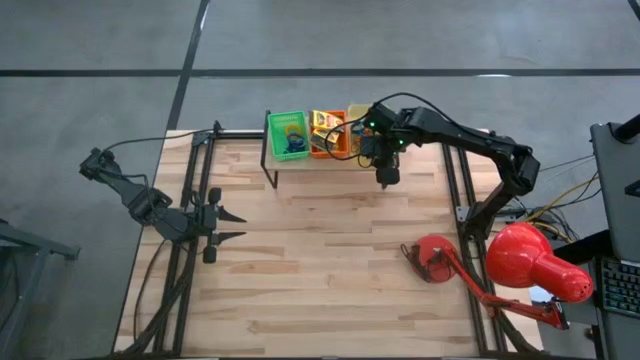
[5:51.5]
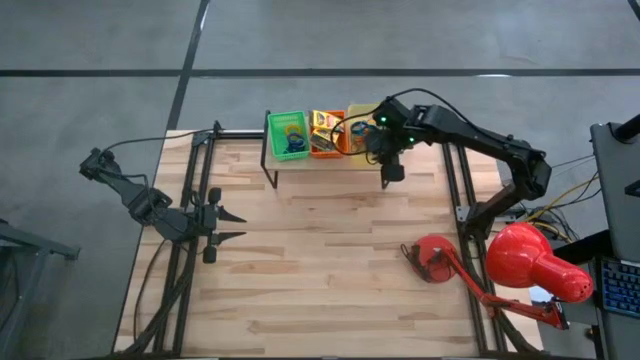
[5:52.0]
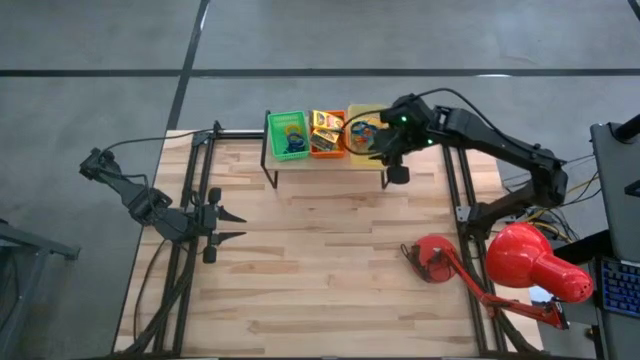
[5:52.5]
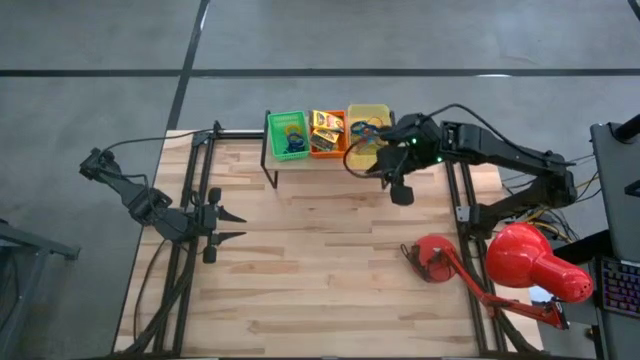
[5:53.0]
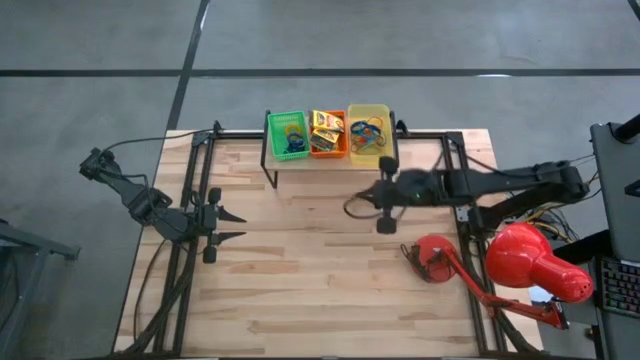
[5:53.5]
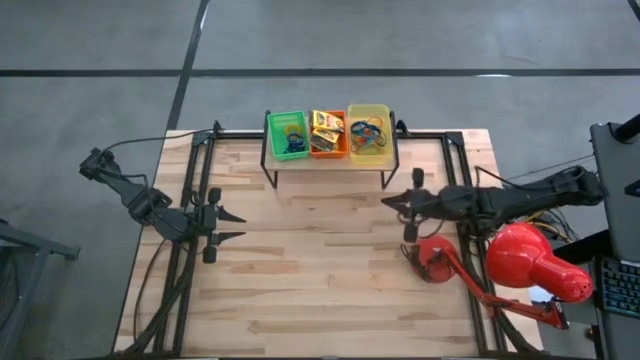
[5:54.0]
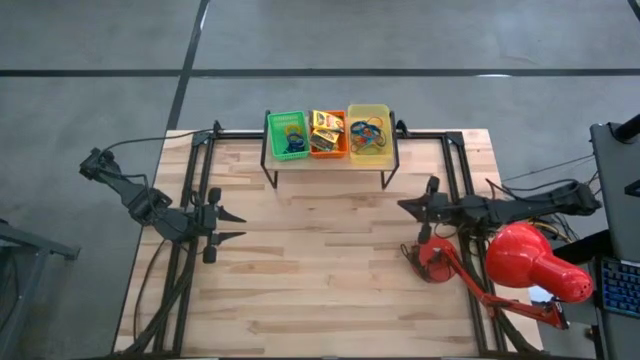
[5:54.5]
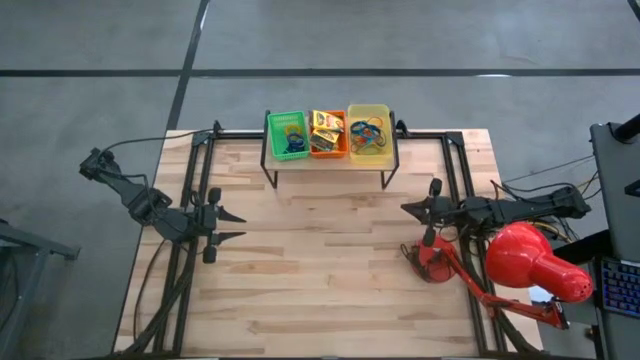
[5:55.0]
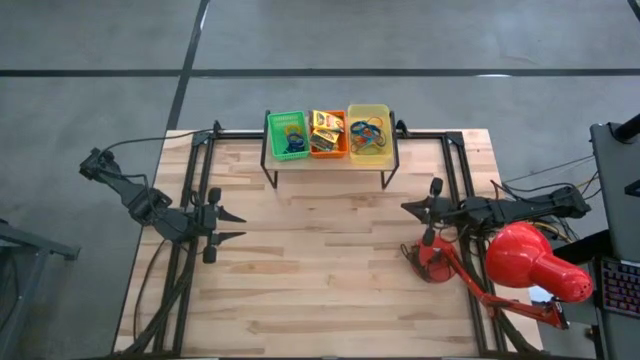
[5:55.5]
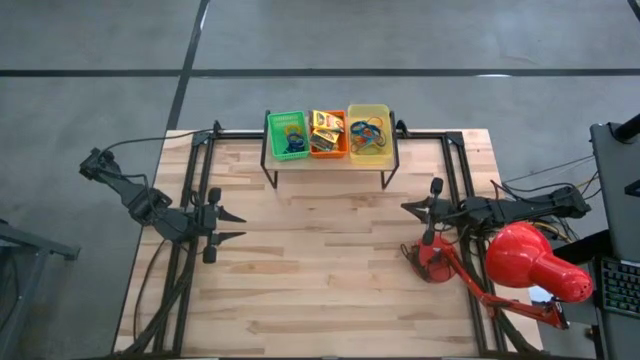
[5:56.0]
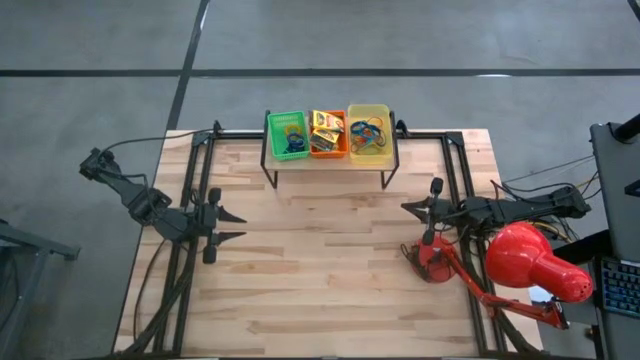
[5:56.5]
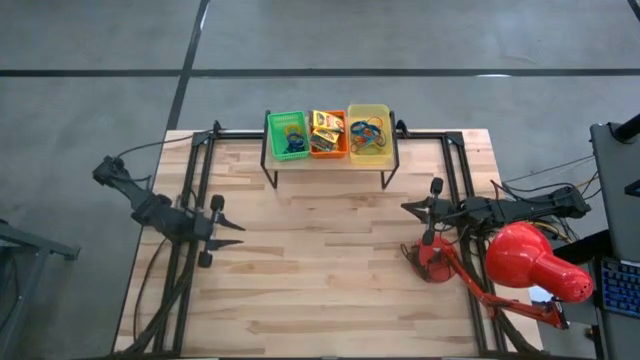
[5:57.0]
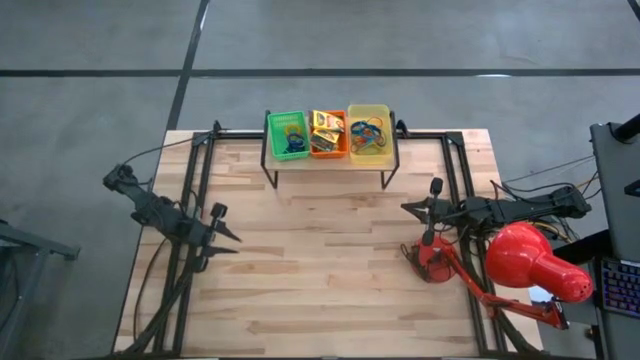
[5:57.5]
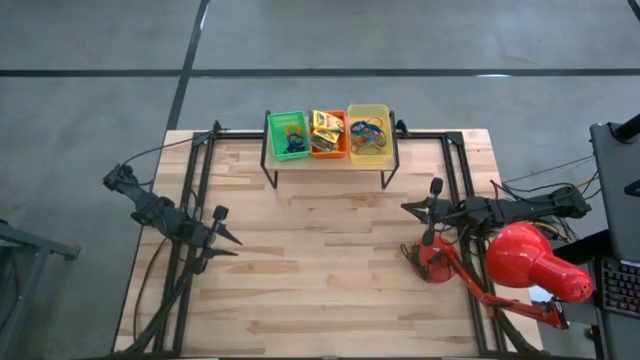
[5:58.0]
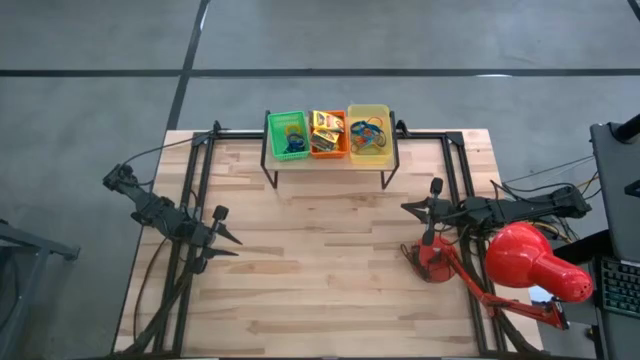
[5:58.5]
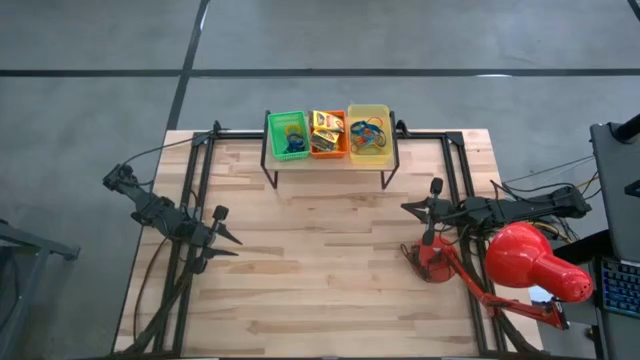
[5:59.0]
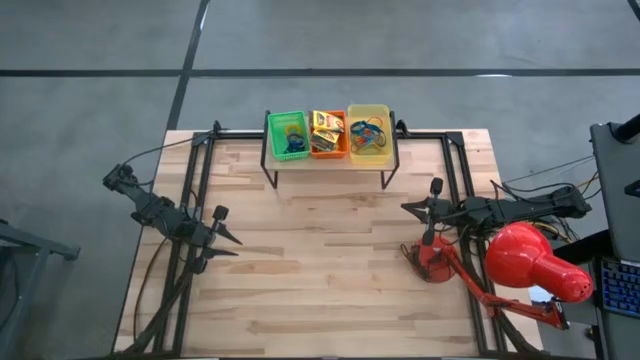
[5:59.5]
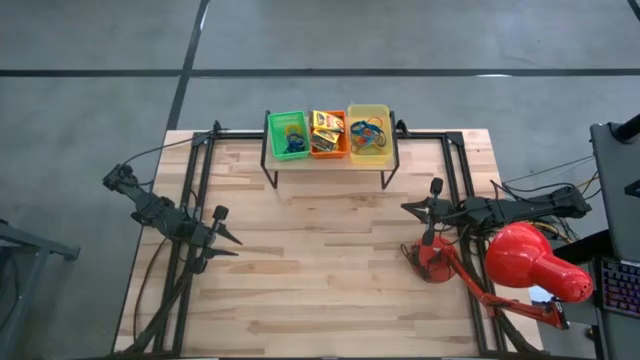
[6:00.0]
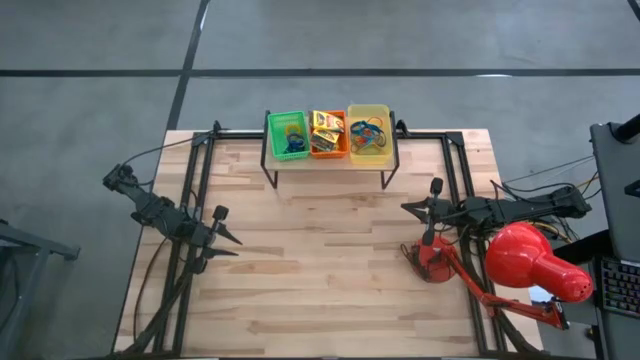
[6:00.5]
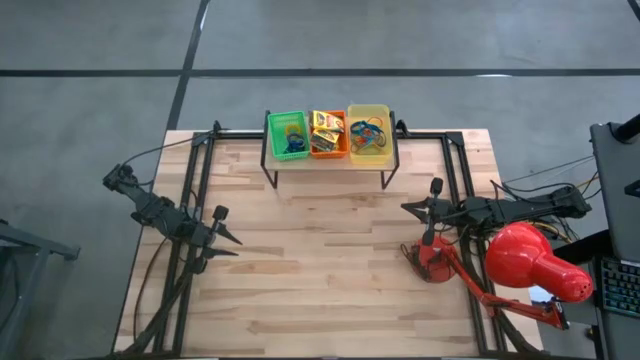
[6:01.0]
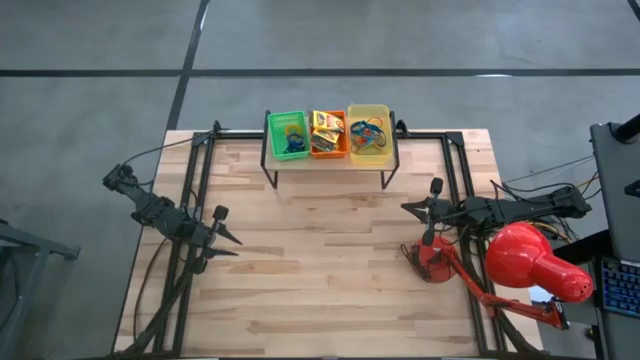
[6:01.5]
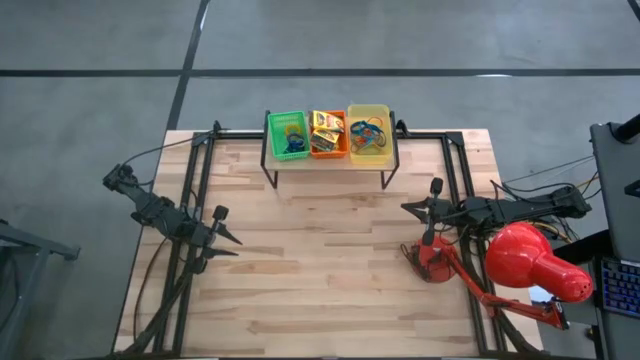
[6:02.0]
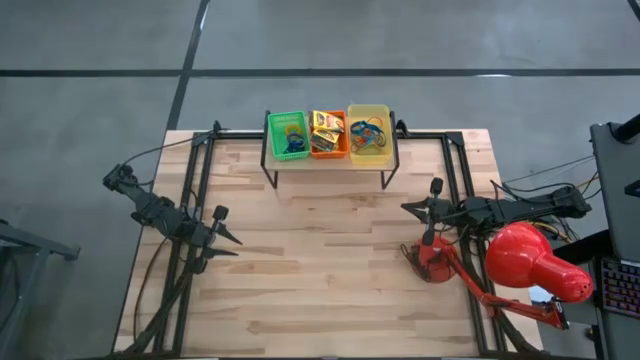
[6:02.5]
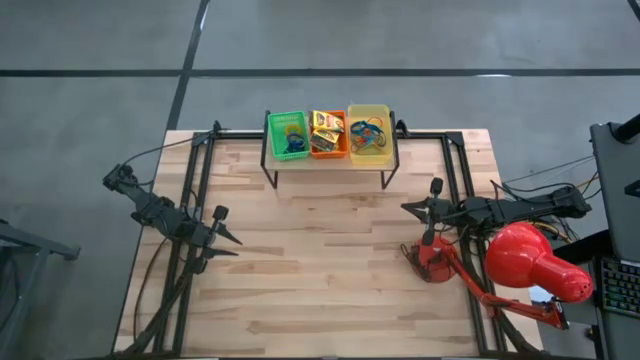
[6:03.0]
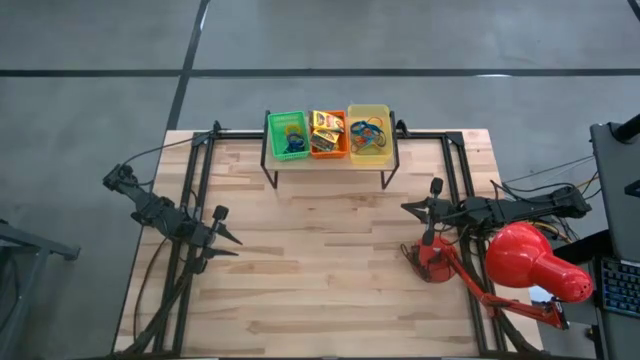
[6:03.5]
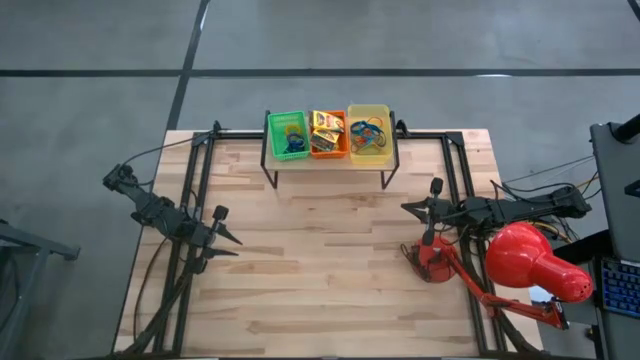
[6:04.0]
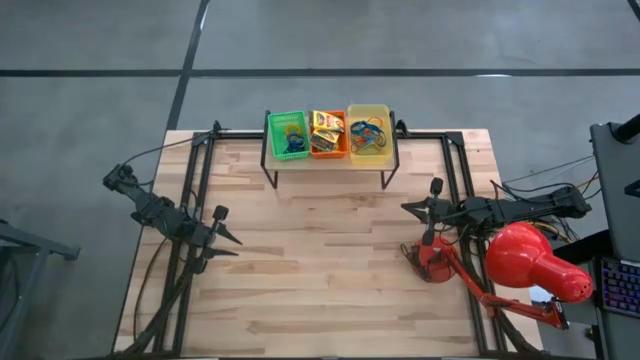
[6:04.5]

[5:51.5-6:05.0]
Task: Pick & Place Office Desk Supplies
Return to Home Position

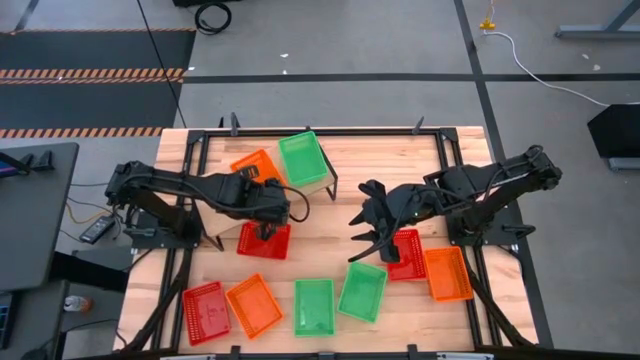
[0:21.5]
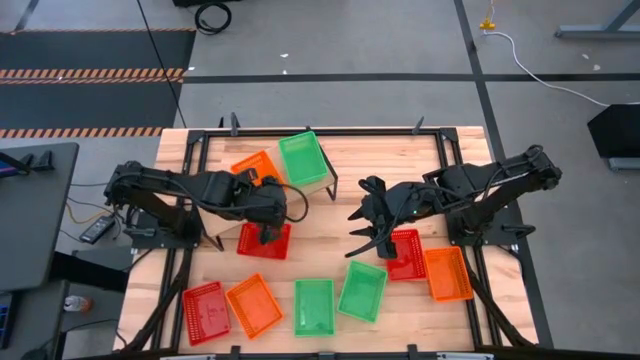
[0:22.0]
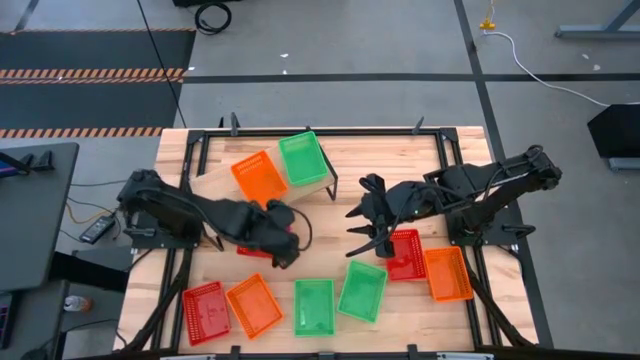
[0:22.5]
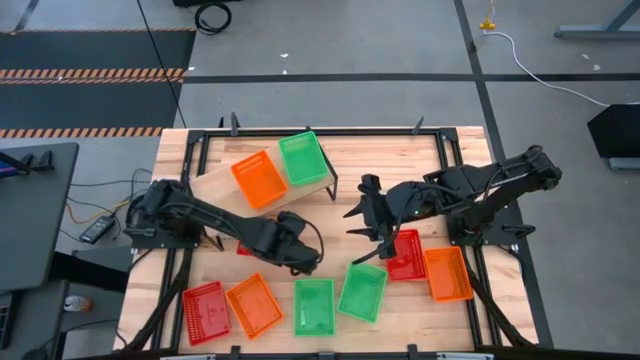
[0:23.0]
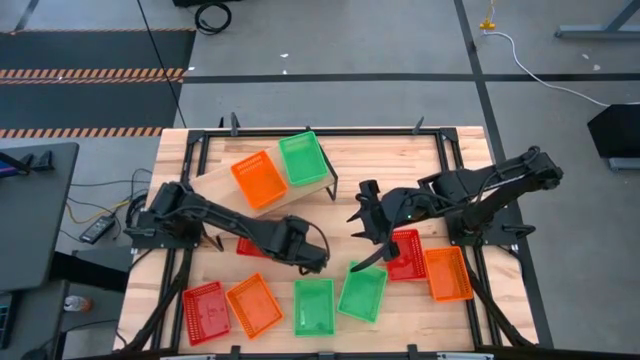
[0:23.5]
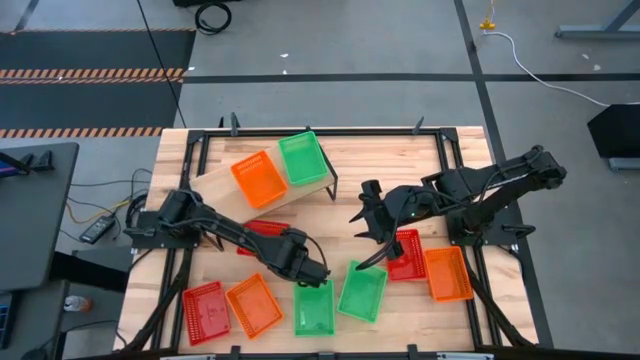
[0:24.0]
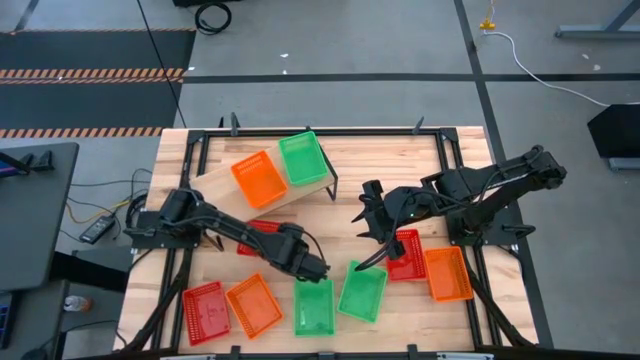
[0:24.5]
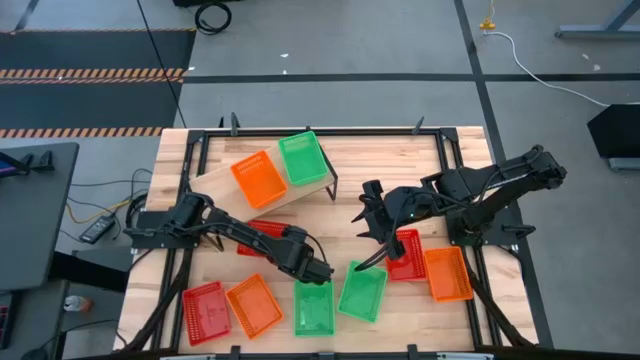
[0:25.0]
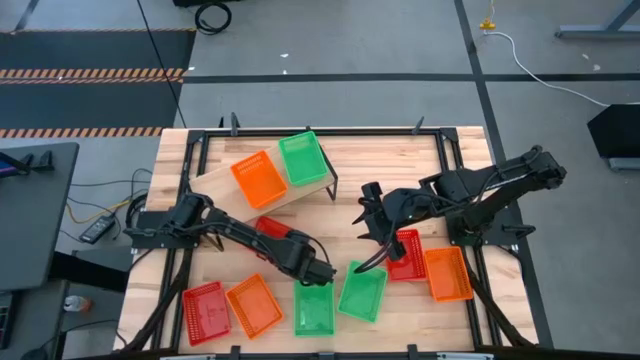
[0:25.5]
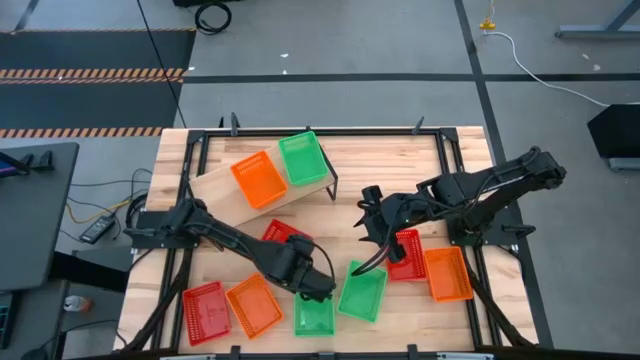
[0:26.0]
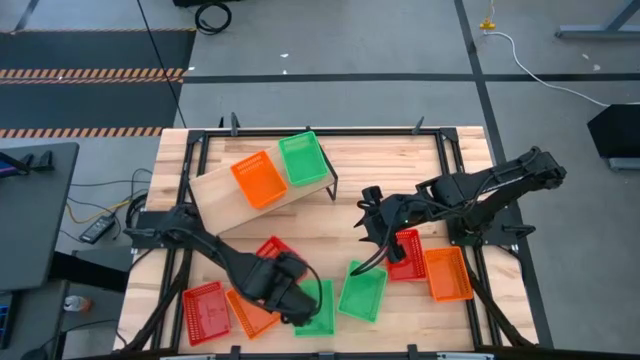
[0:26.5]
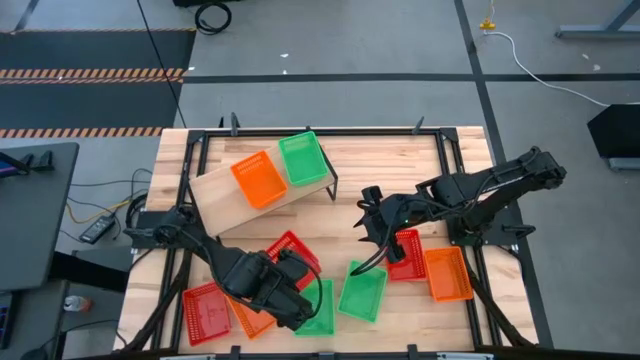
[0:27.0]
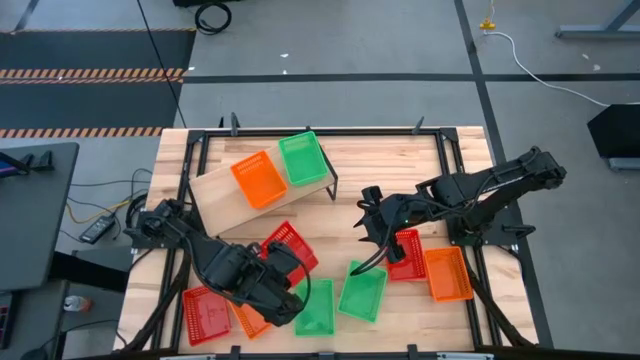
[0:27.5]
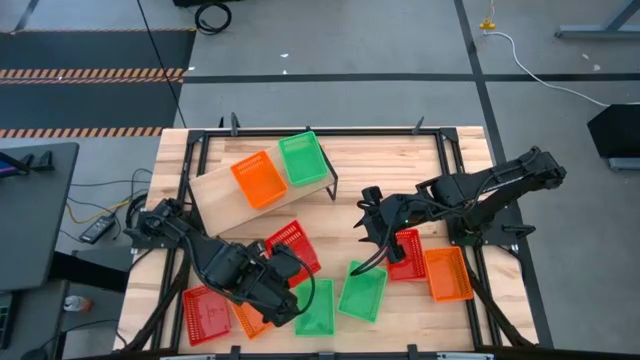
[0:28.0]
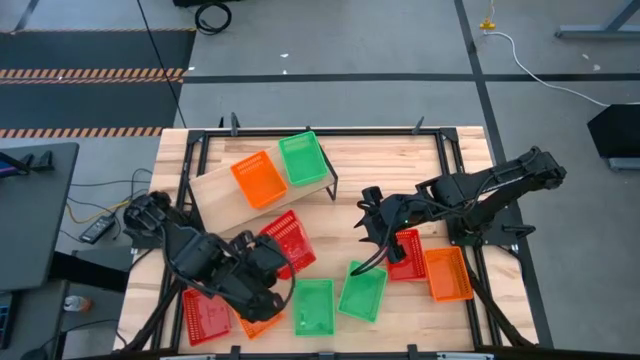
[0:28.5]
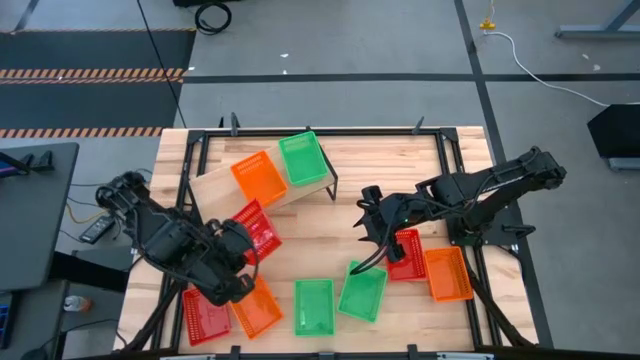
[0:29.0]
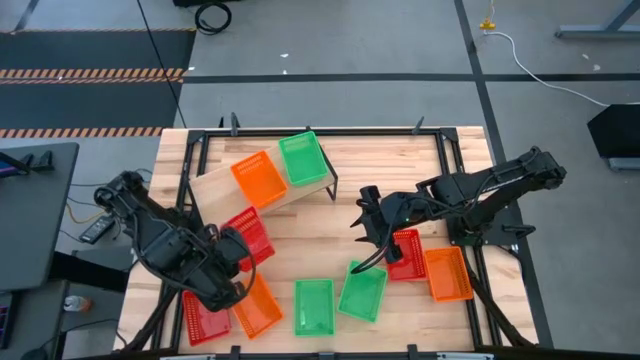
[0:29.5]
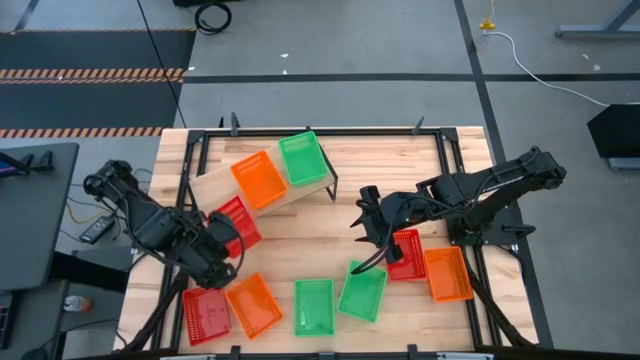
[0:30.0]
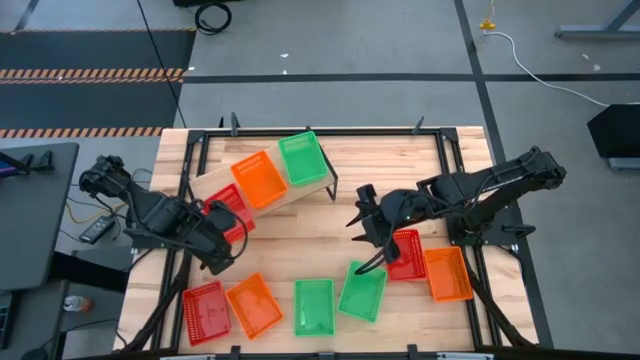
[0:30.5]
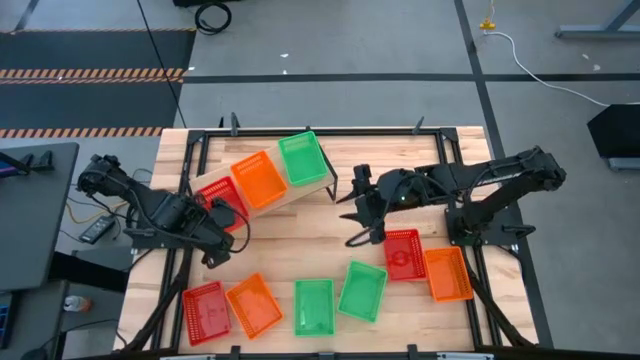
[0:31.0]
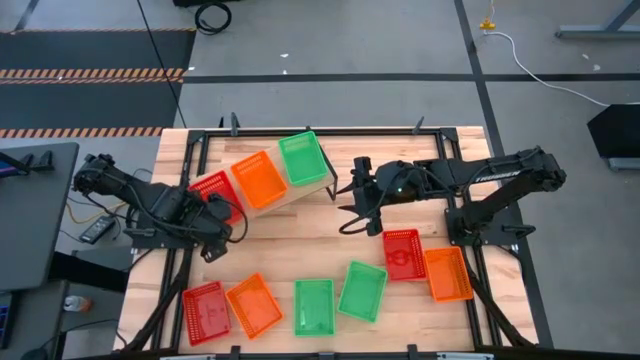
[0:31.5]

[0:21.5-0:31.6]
Task: Stack baskets on shelf by color
Put the top right red bin on the shelf
